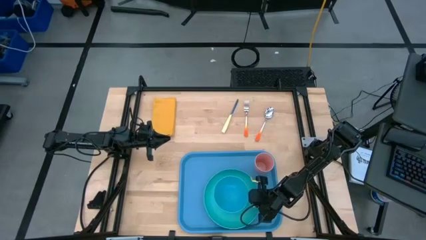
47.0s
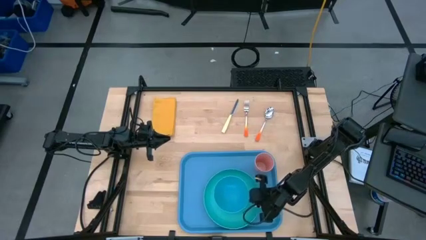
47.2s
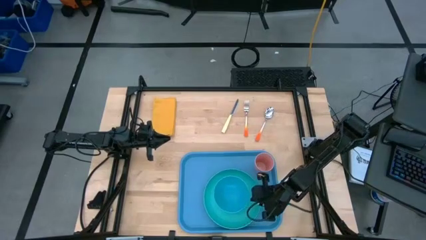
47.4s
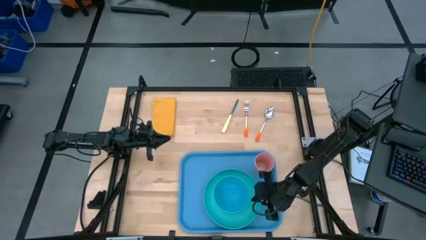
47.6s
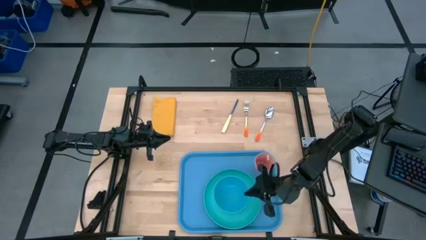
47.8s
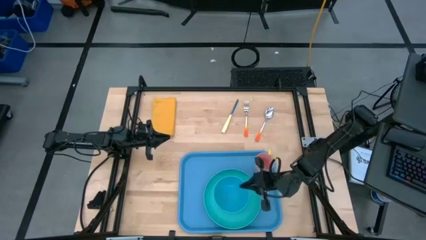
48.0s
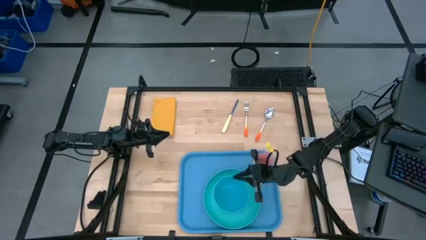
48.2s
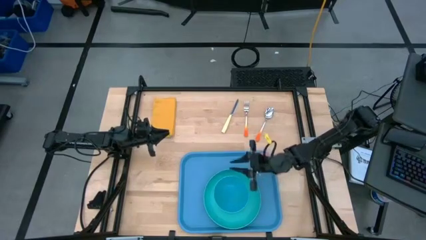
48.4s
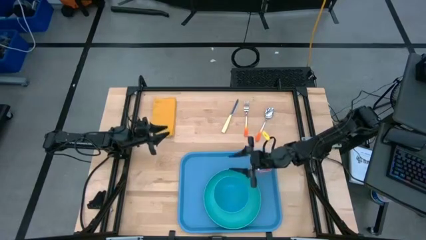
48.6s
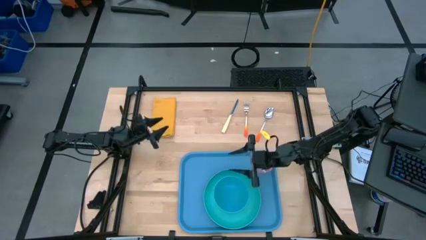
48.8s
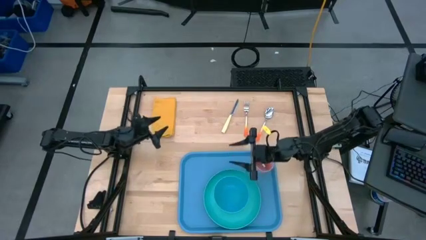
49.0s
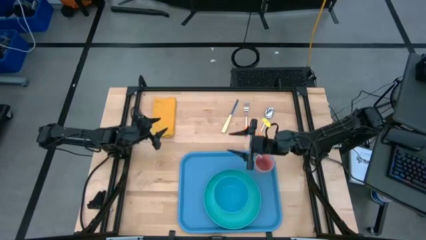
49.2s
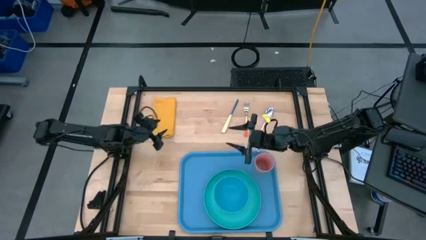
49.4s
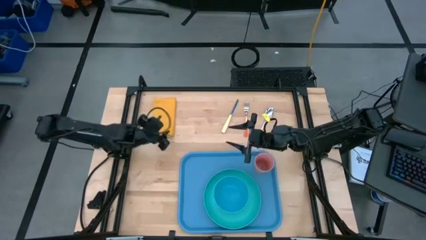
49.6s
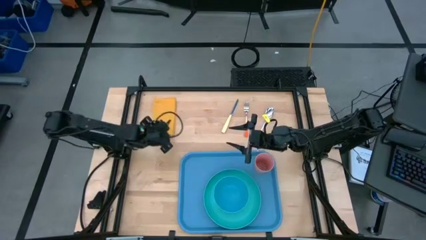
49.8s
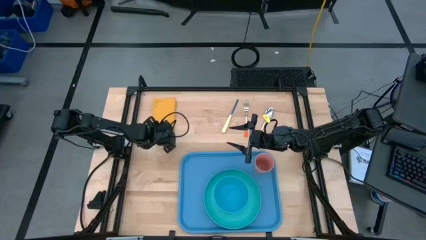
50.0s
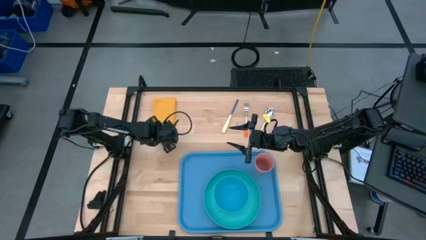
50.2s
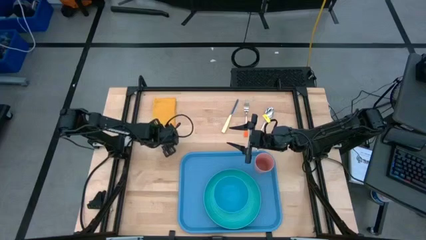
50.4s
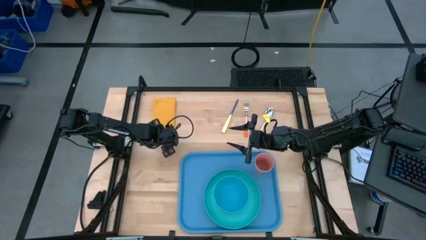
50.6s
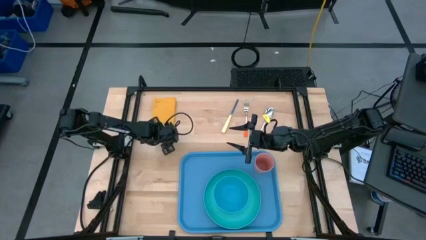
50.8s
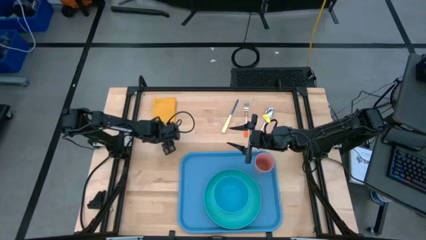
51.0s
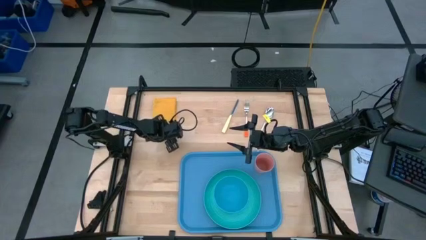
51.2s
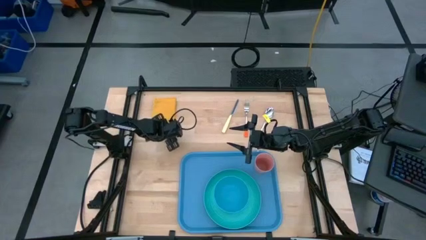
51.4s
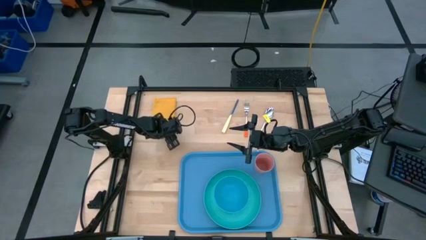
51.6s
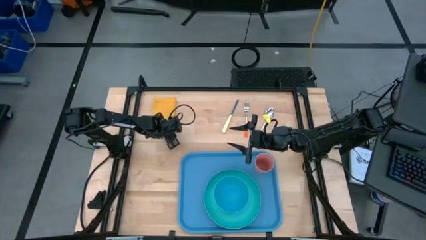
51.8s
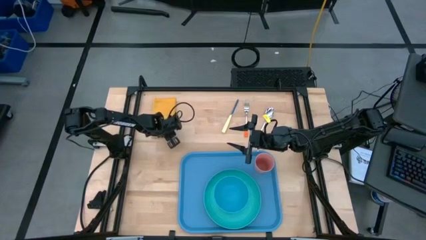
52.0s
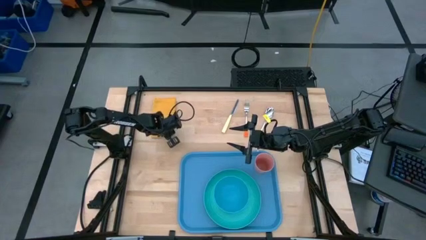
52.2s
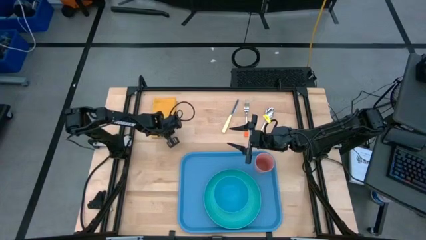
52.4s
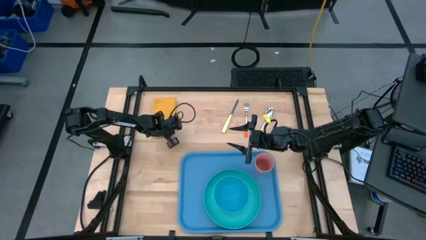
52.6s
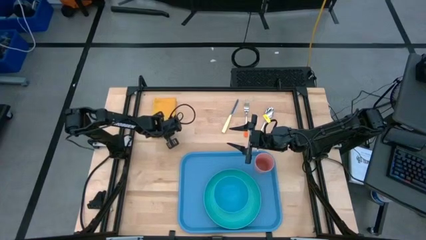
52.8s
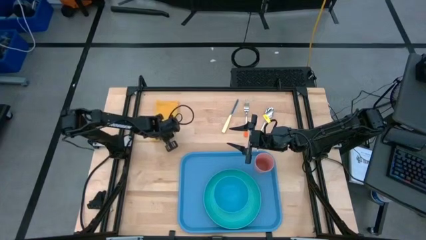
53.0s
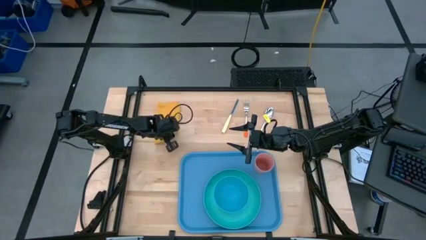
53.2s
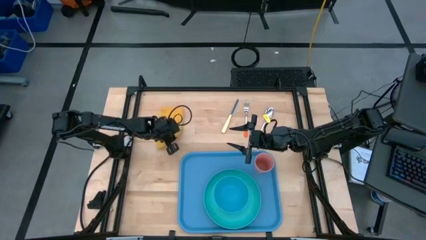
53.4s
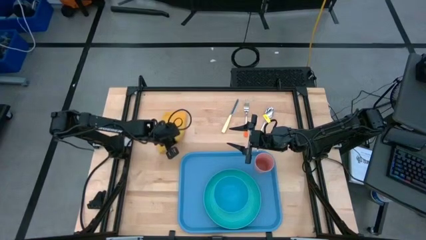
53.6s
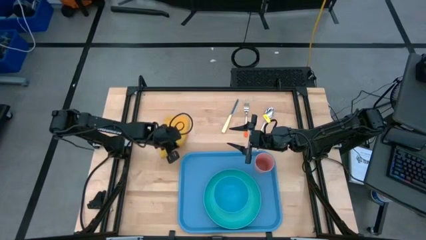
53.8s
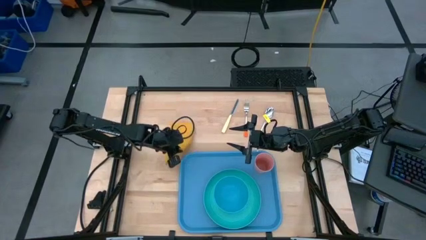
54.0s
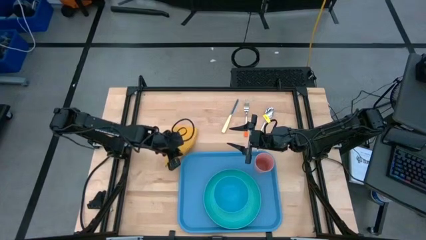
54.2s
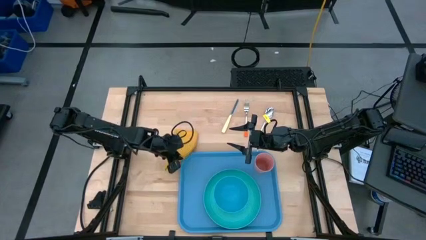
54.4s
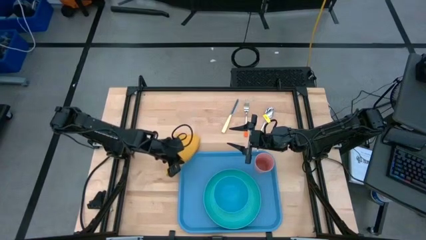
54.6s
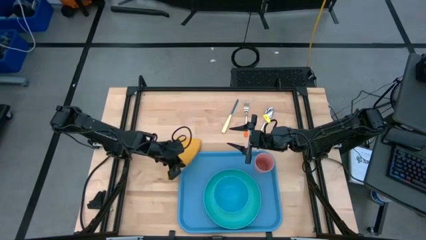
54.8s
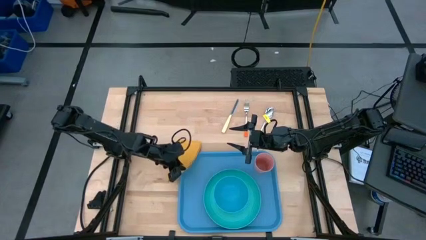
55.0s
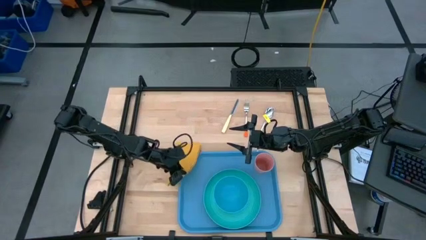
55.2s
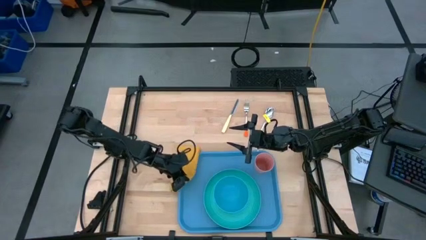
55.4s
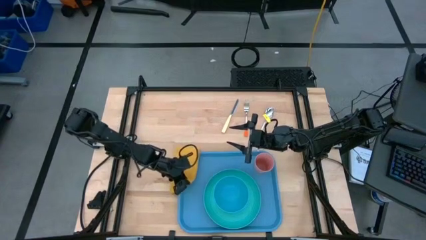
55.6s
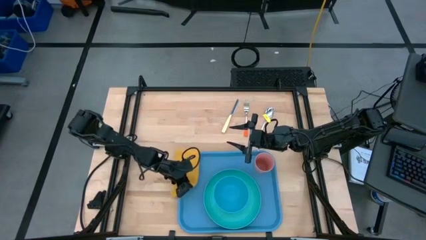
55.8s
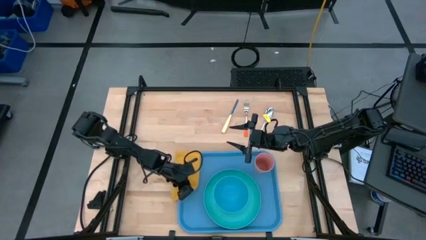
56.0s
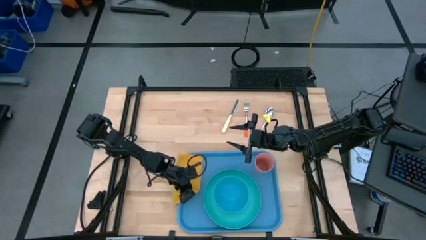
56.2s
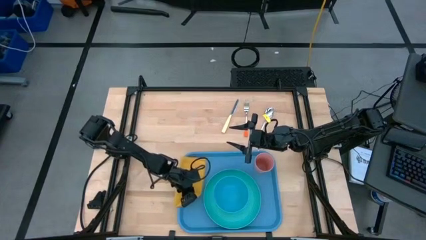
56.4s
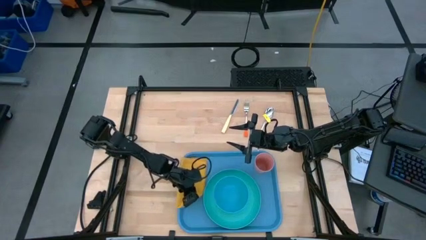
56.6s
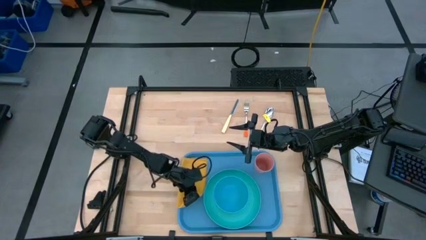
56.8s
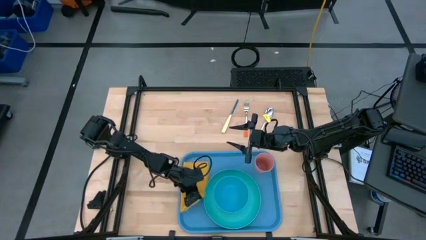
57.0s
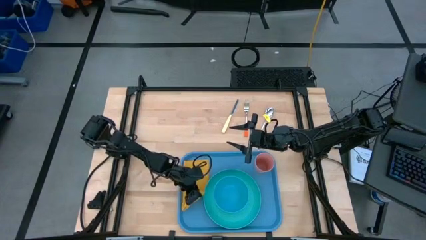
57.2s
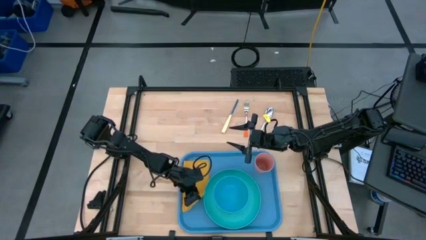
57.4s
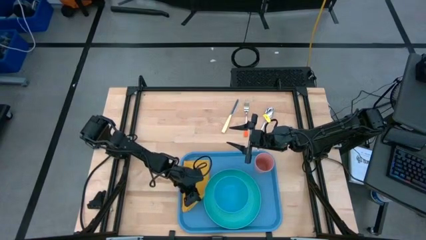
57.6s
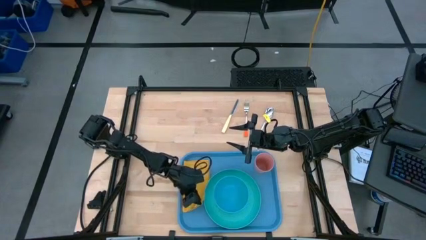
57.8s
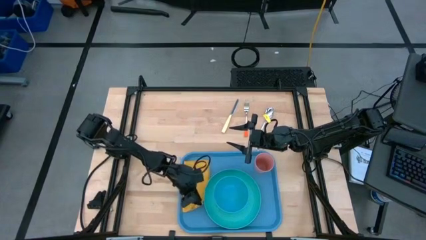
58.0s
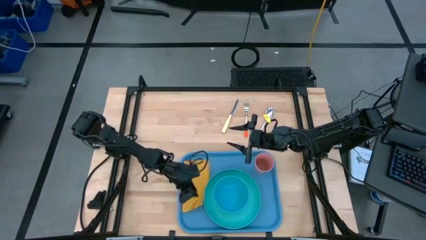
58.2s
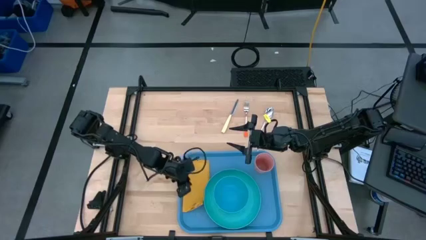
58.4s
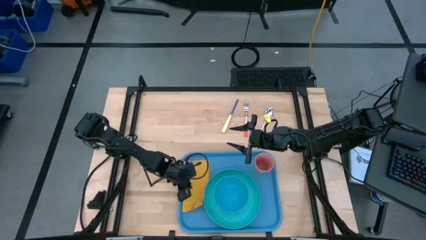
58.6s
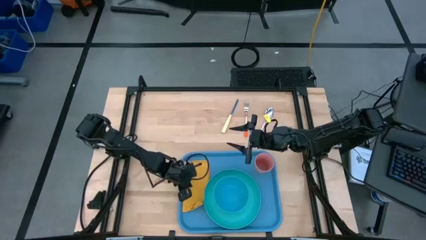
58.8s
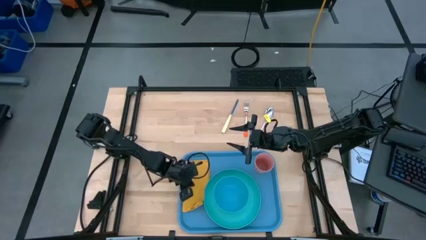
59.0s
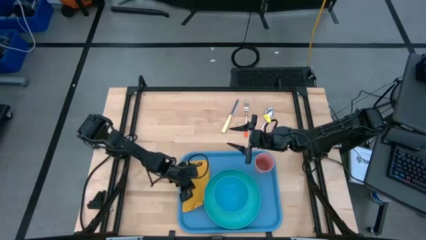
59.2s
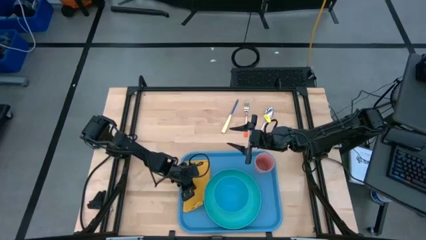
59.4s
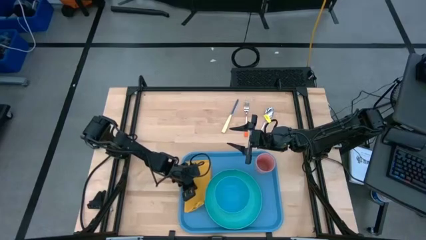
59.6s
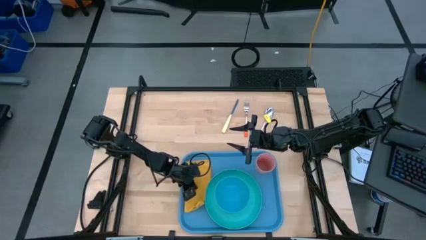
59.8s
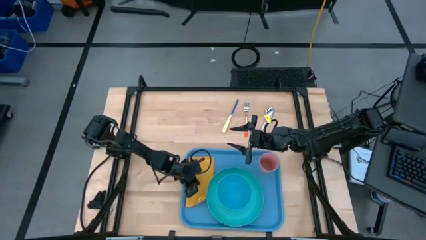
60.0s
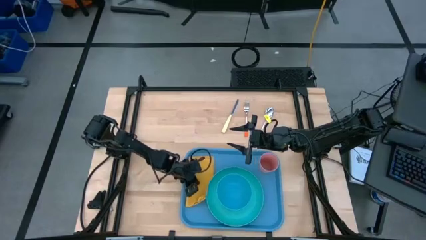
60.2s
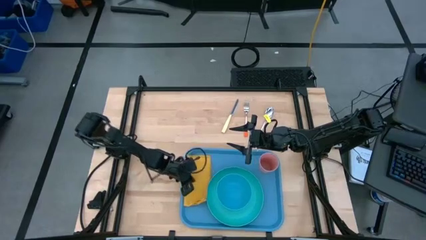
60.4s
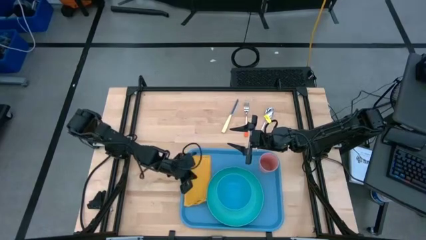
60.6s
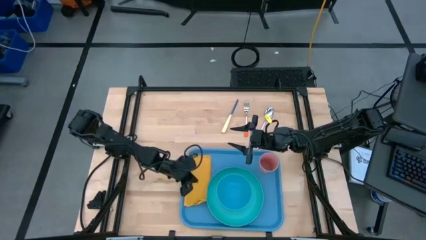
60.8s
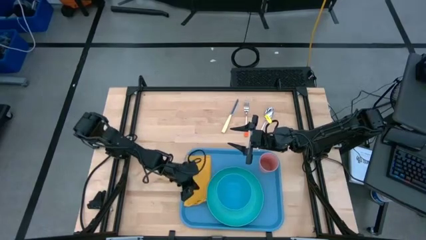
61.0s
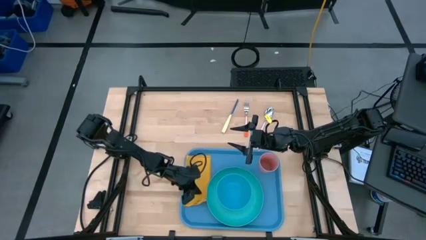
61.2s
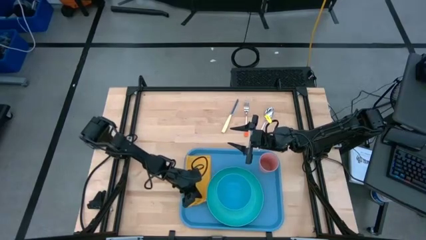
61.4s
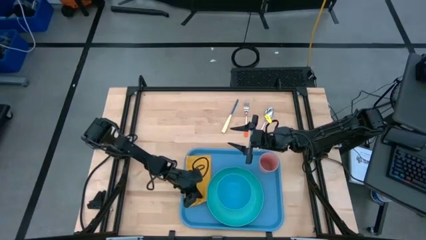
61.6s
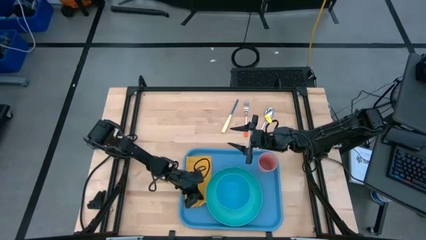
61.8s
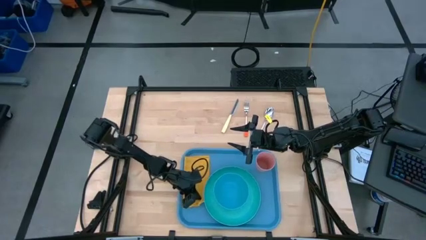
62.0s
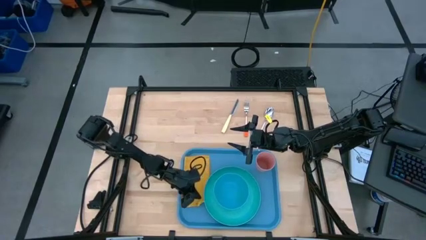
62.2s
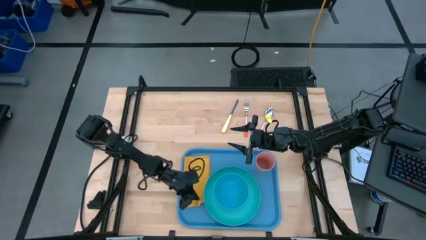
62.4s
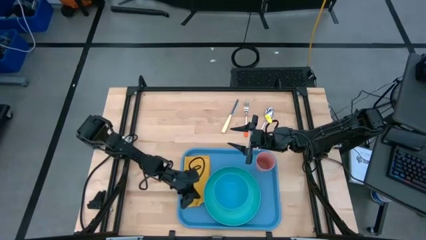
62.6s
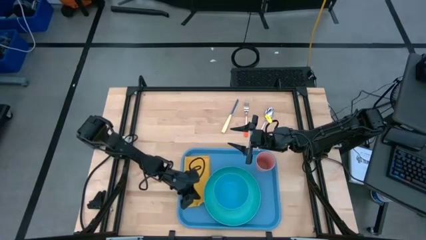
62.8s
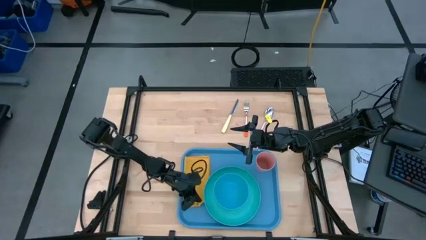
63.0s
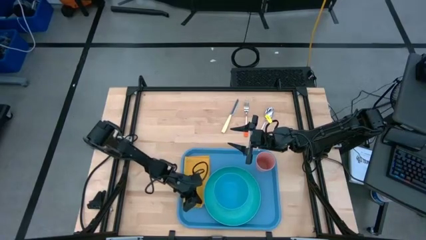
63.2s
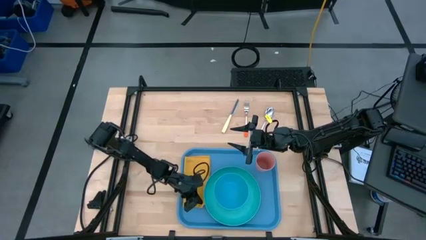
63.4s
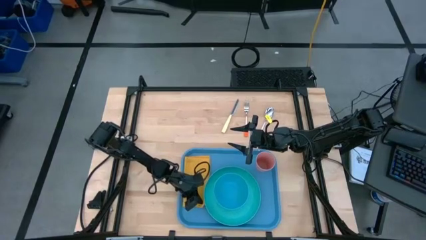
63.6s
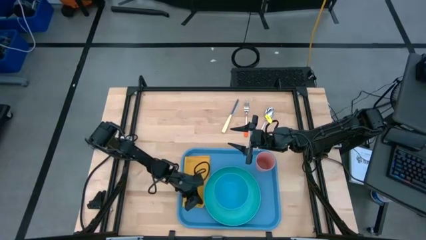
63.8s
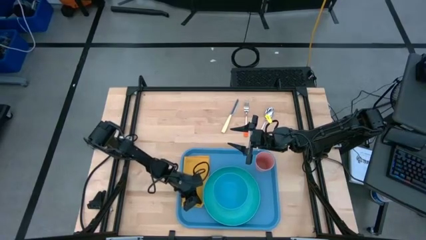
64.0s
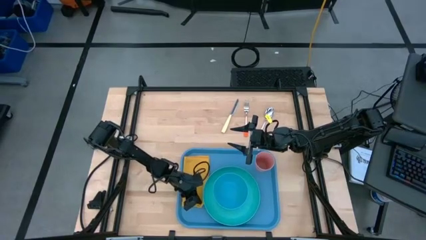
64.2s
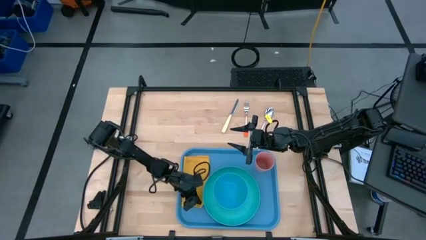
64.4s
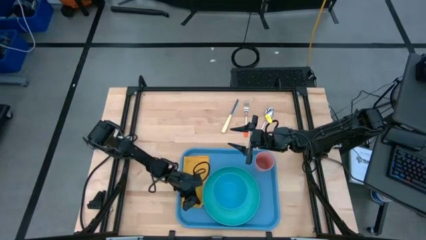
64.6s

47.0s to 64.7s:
Task: Set up tray
Put the orange napkin to the left of the green plate on the blue serving tray
